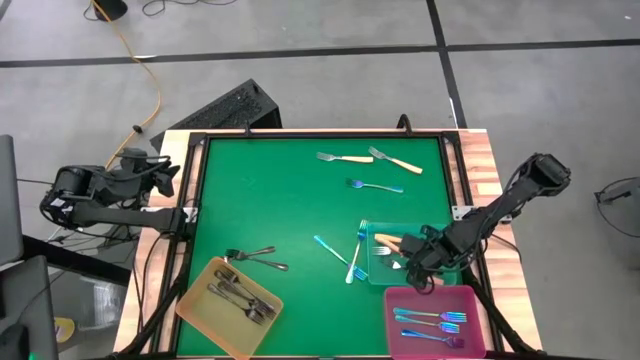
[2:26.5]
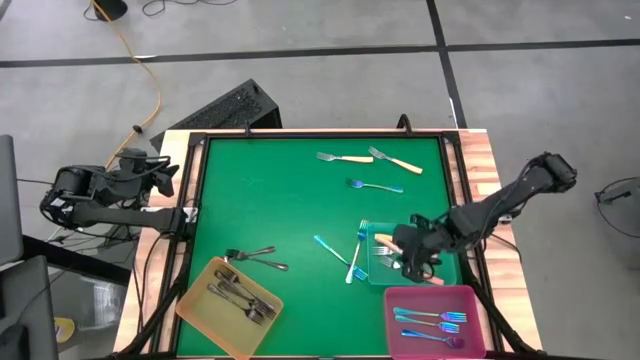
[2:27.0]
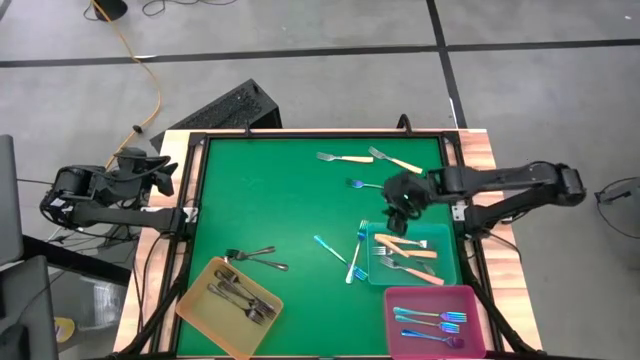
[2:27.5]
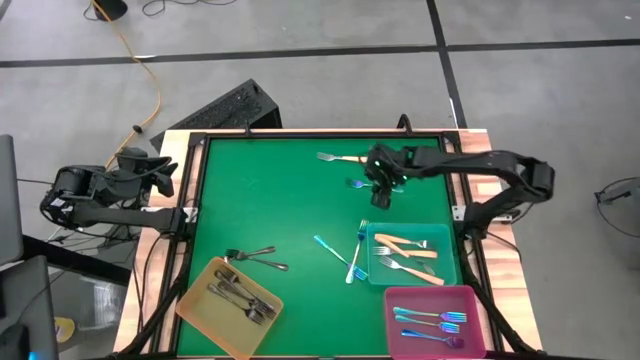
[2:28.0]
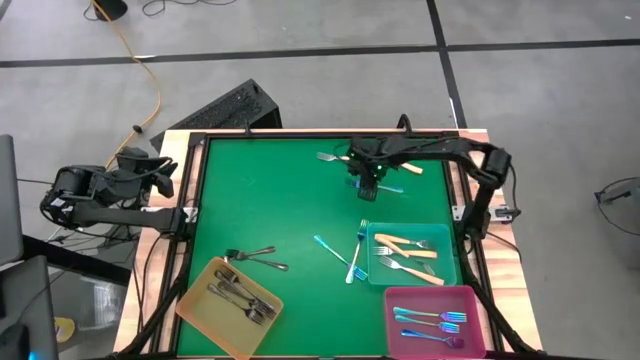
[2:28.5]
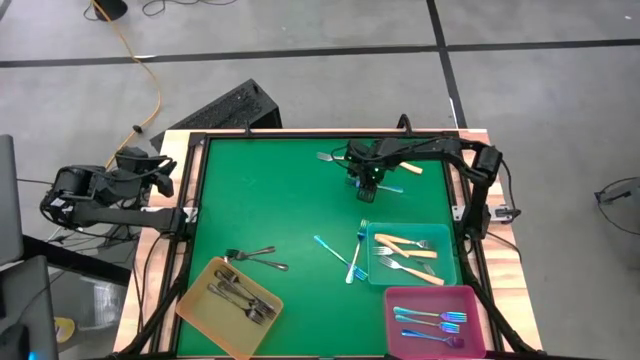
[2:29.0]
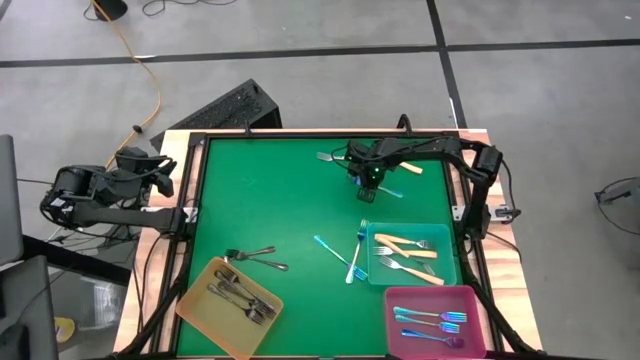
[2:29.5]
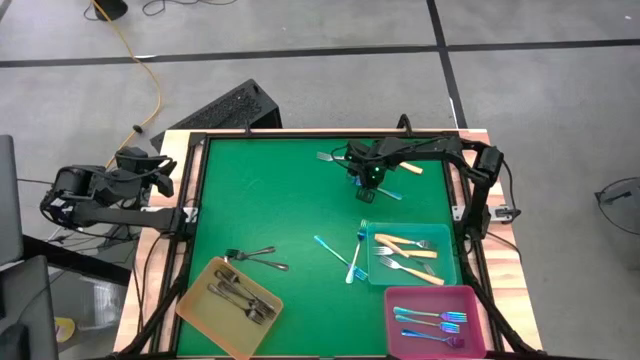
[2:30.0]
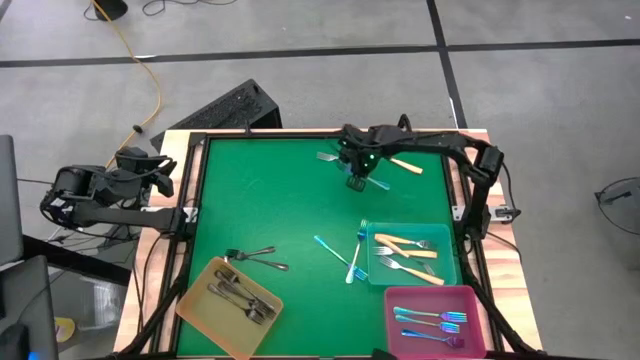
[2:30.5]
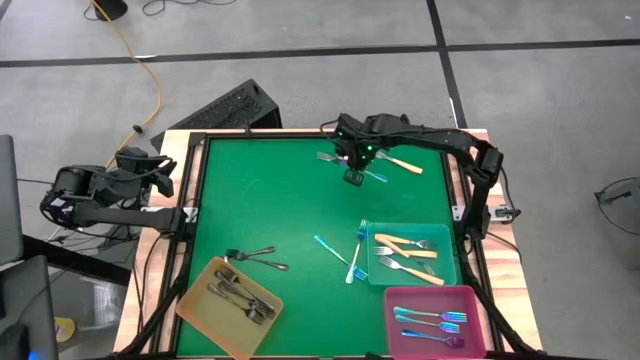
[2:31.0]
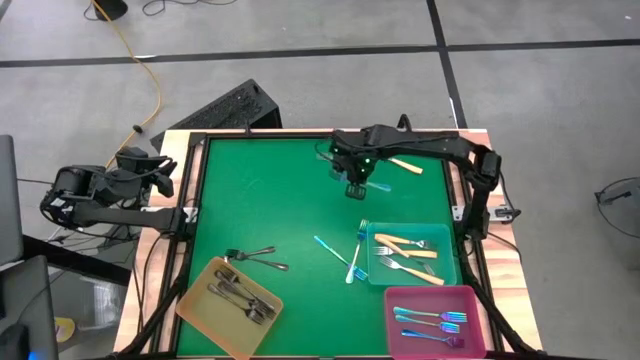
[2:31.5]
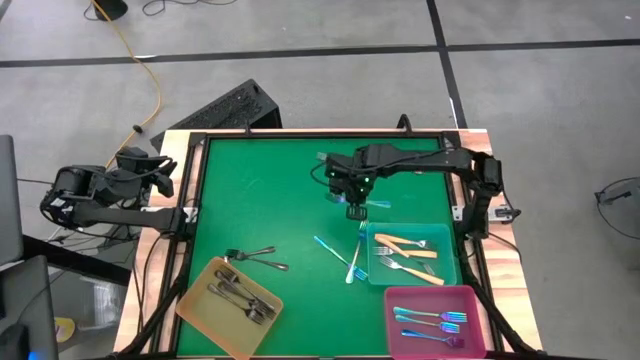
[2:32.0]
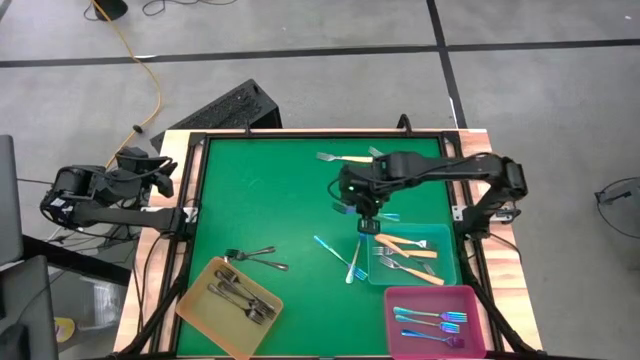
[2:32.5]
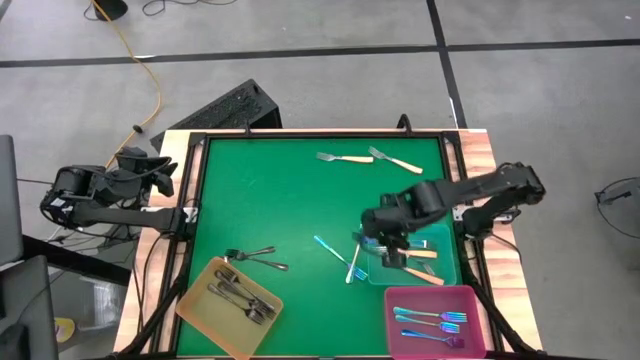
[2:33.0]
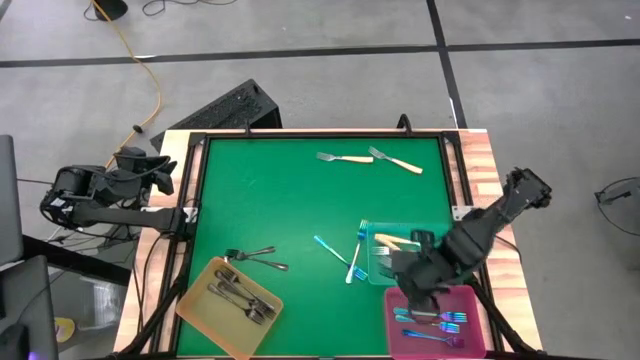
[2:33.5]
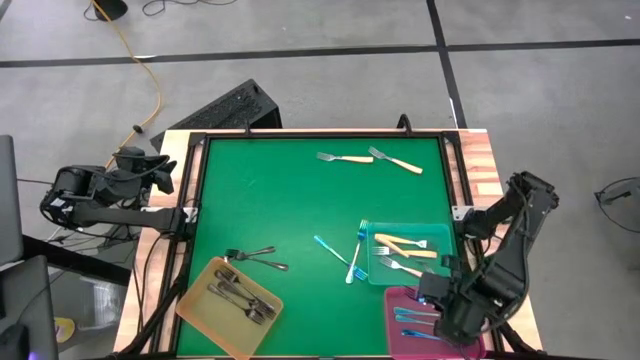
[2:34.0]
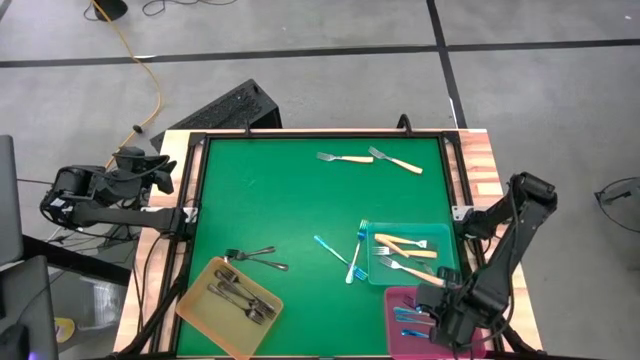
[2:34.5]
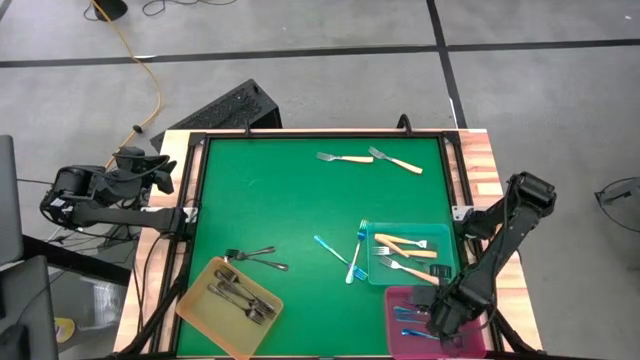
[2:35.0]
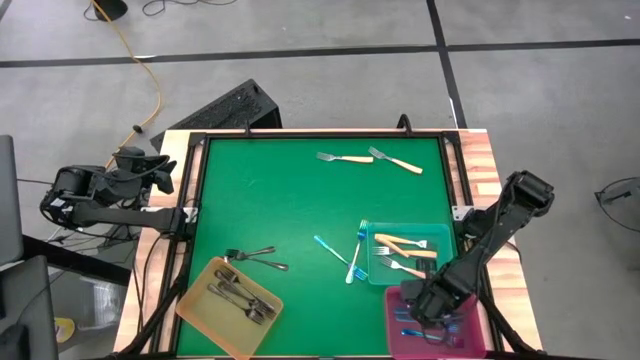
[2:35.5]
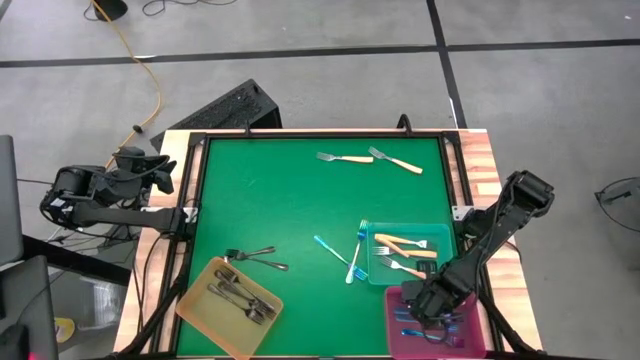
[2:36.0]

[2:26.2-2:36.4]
Task: Sort silverware by color (type)
Put the purple fork into the pink bin

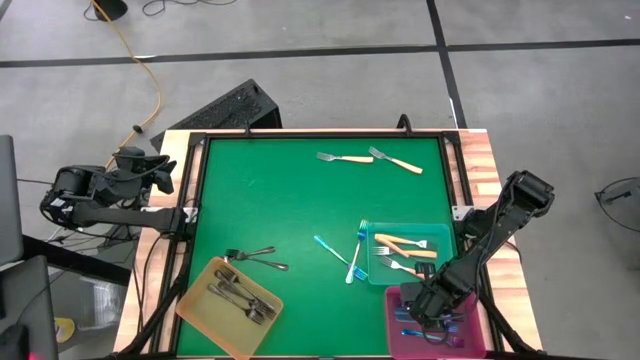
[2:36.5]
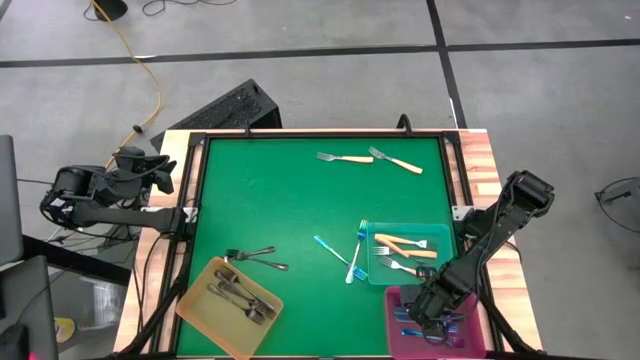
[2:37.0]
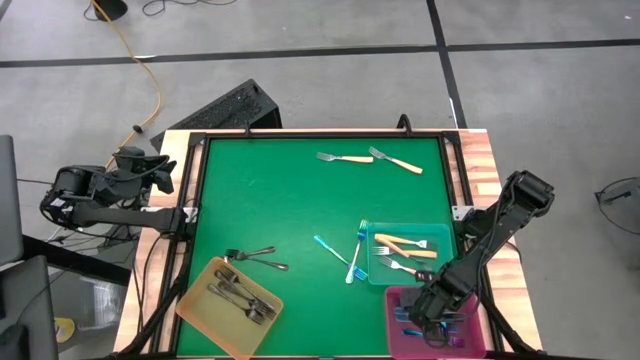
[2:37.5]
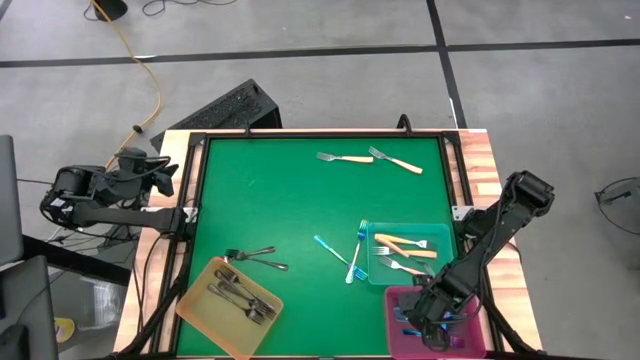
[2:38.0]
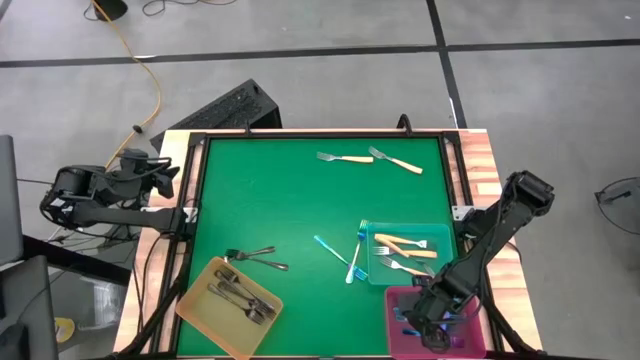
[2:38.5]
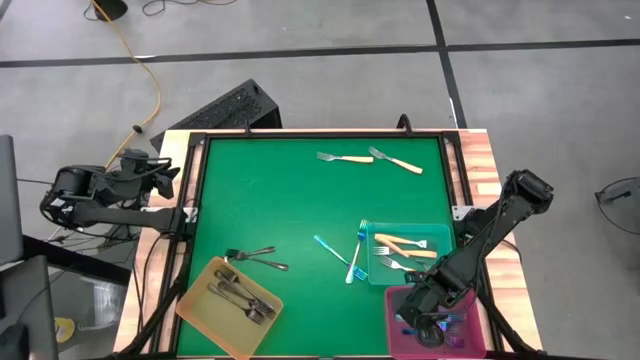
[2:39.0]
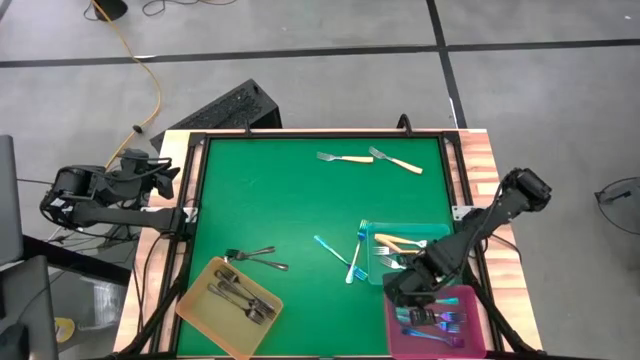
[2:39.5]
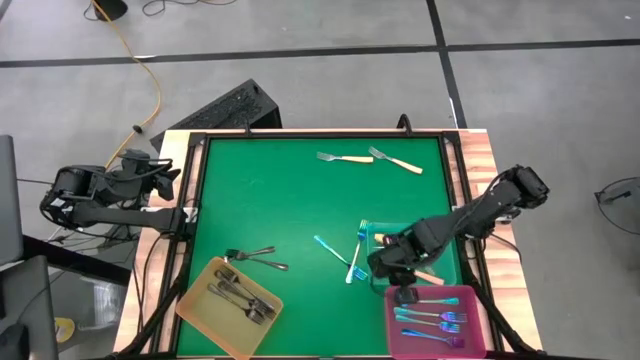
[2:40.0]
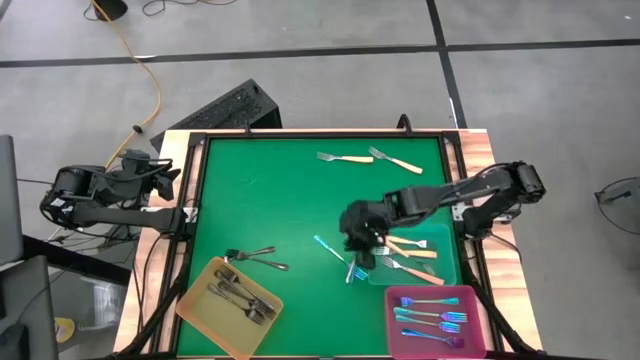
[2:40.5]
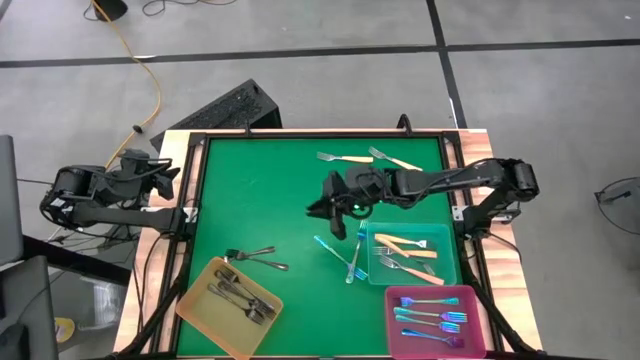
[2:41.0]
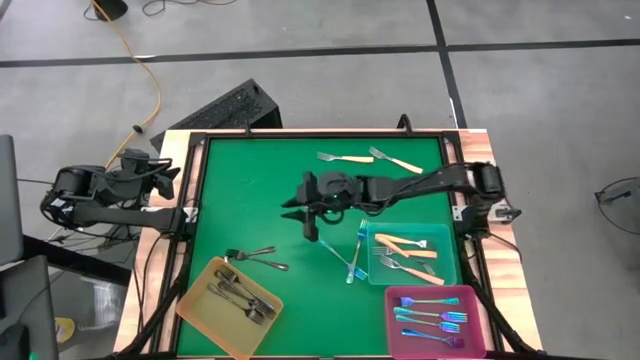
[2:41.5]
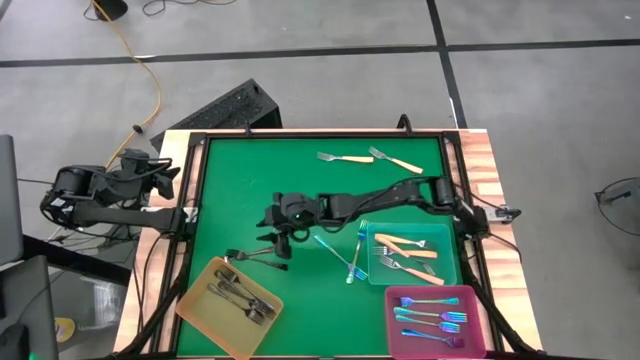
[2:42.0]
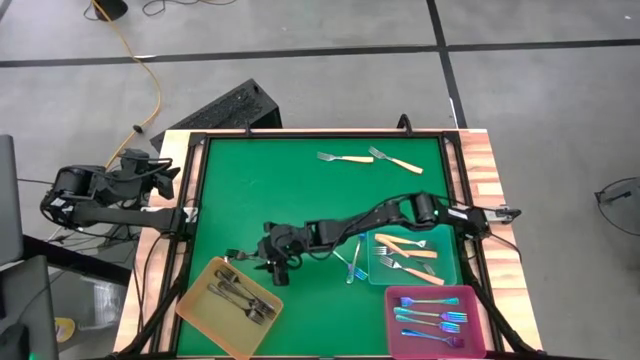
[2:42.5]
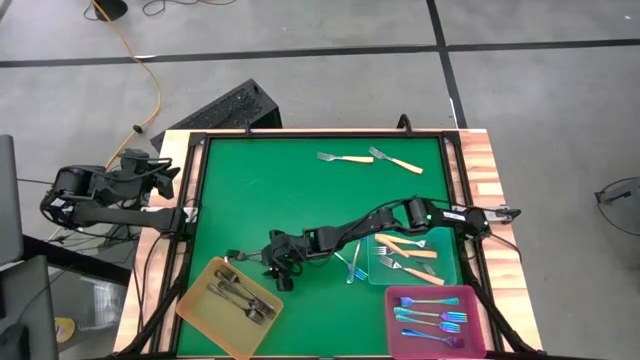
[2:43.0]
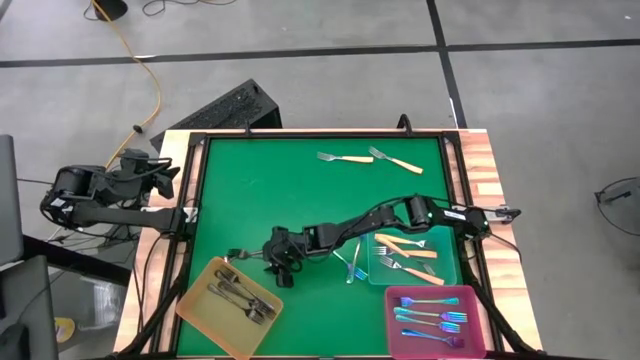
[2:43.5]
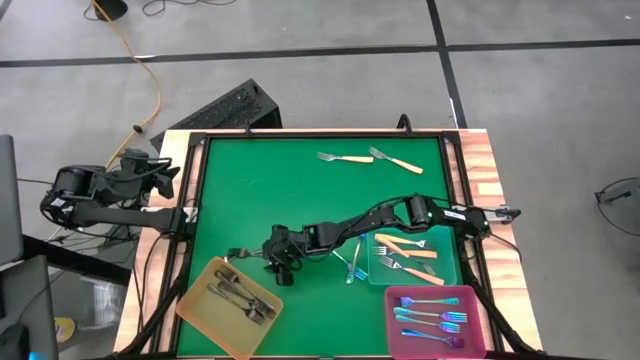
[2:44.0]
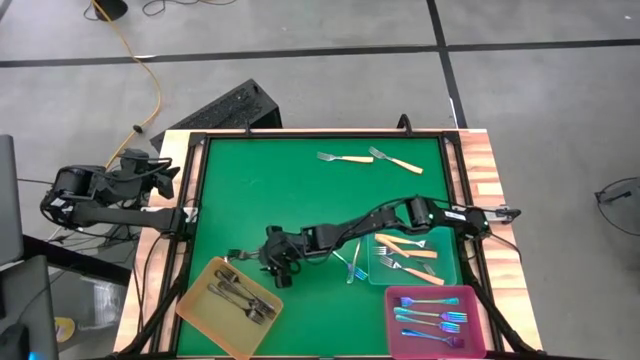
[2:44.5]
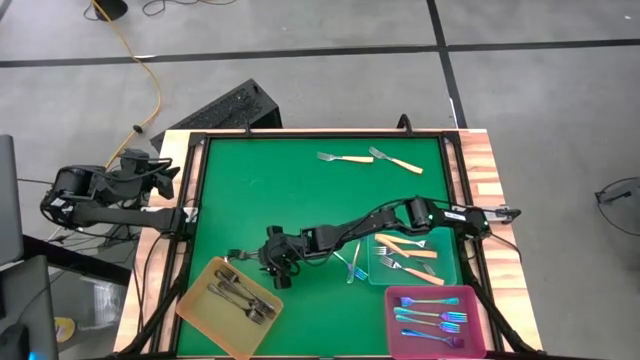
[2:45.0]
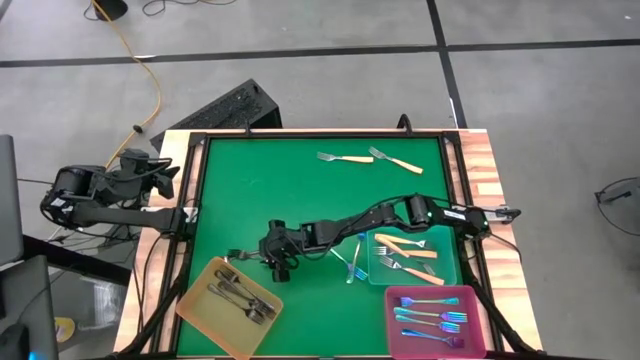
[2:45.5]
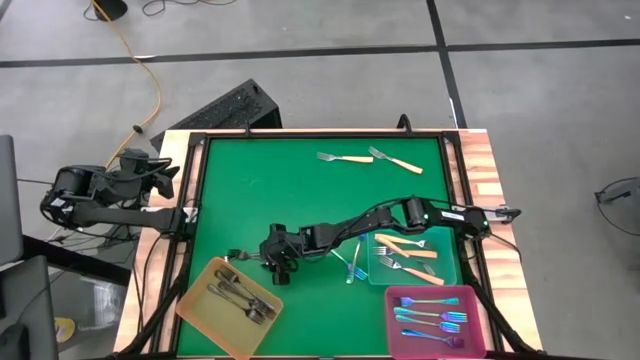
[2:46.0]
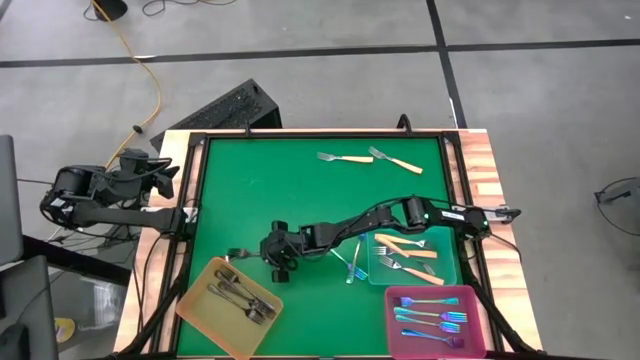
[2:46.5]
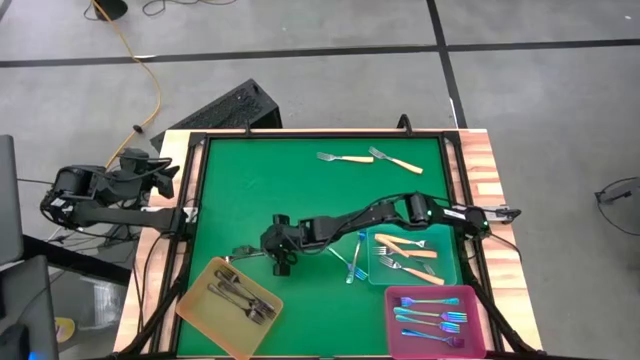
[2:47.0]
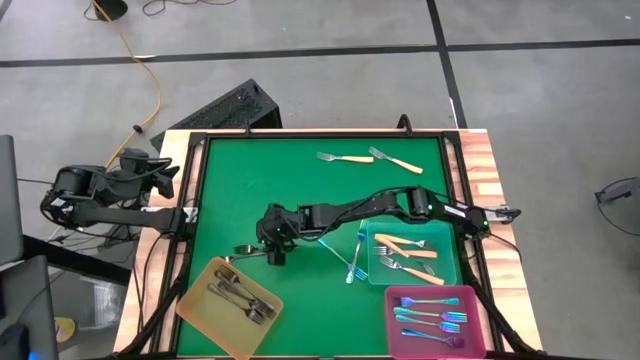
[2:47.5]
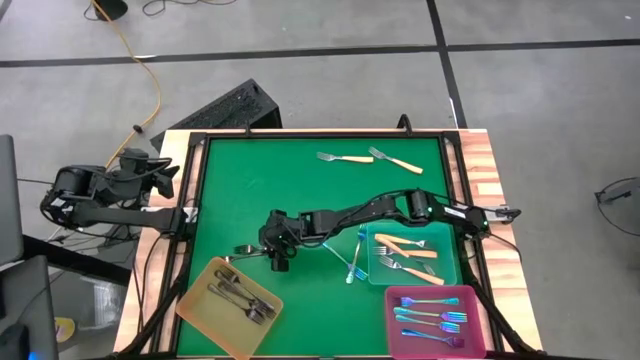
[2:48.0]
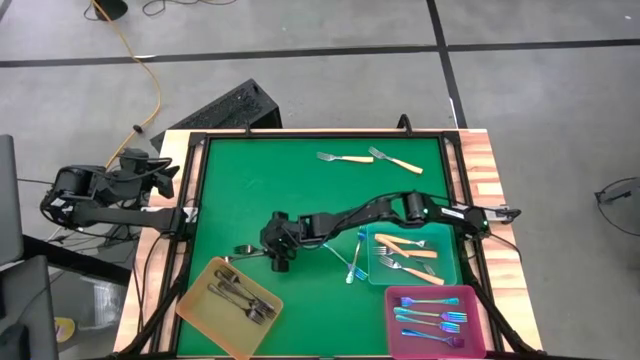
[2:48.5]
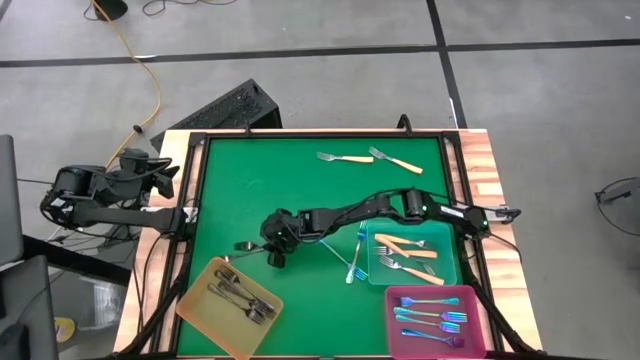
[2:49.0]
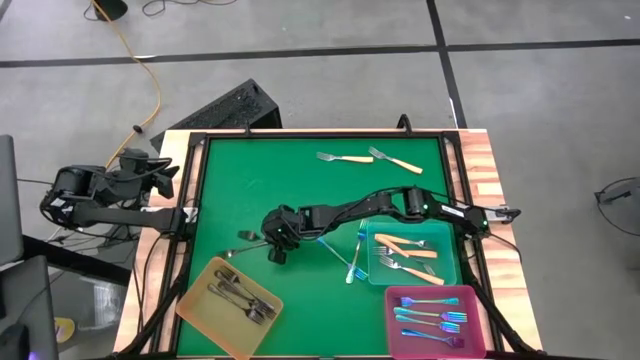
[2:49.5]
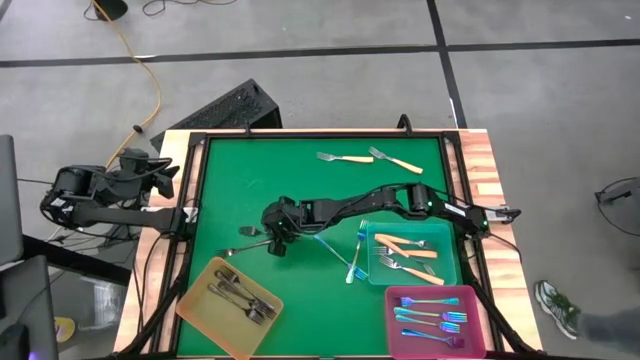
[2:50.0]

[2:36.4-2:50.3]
Put the black fork into the orange bin
